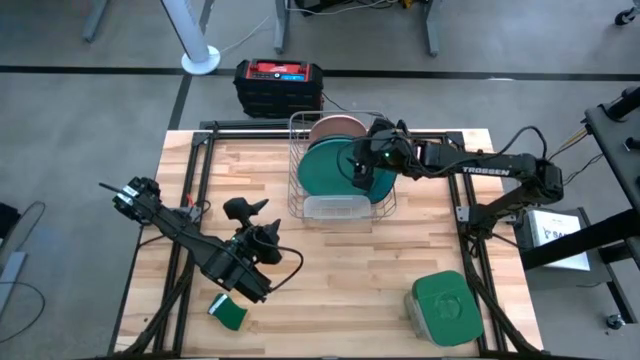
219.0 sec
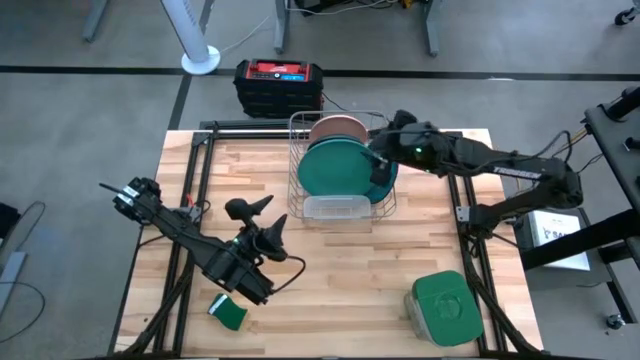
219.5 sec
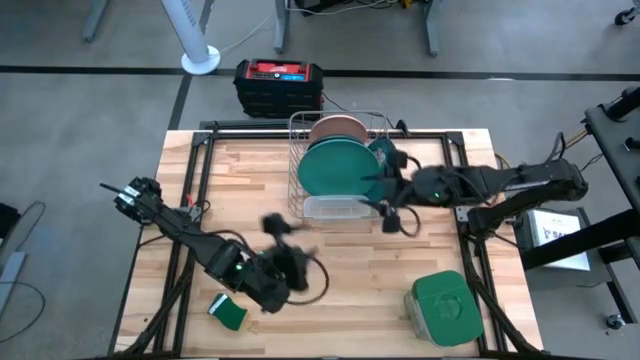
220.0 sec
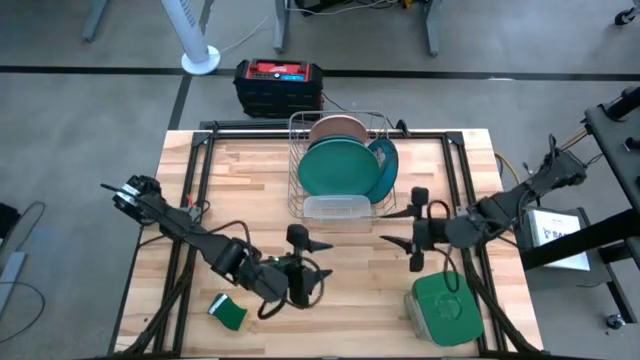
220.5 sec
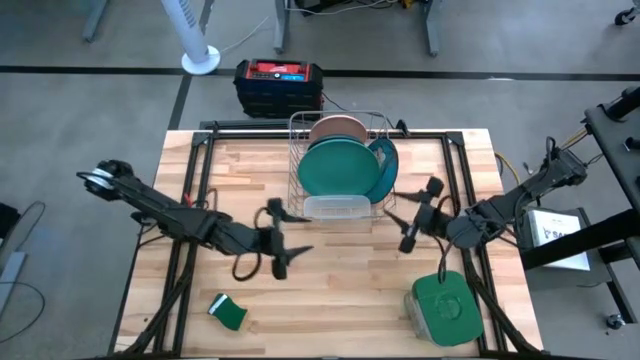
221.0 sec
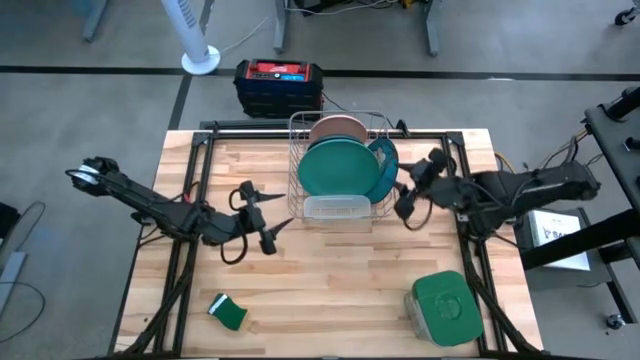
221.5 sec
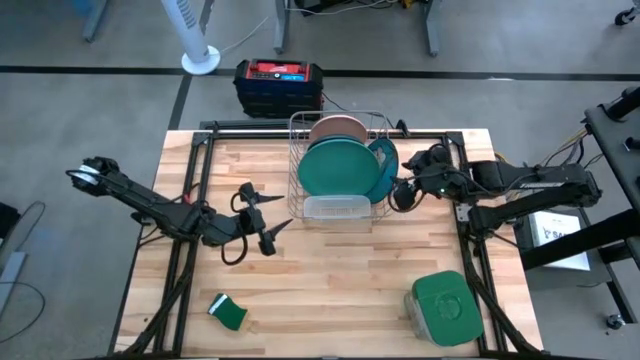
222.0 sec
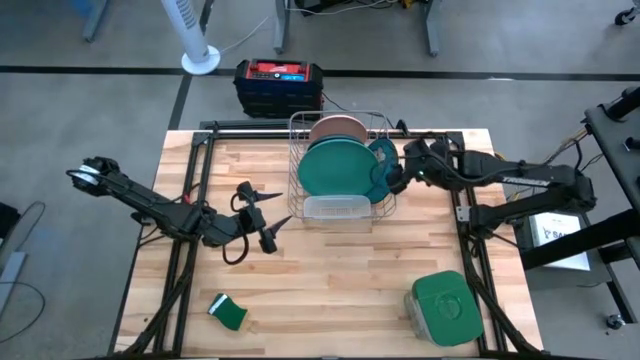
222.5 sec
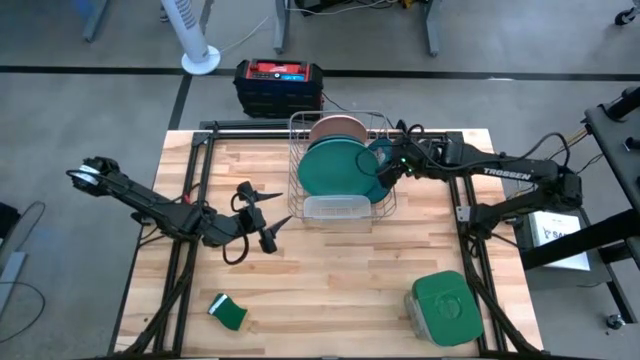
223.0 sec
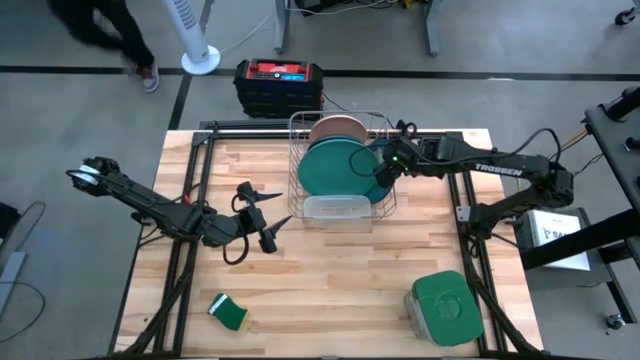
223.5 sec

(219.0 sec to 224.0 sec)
Task: Sort dishes
Adjust the blue plate

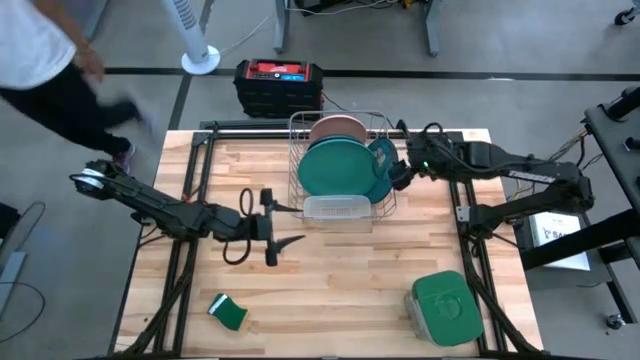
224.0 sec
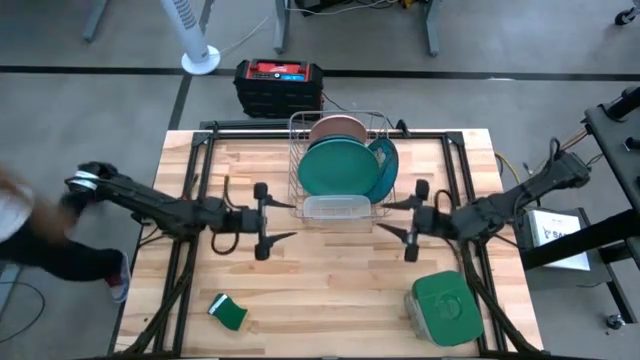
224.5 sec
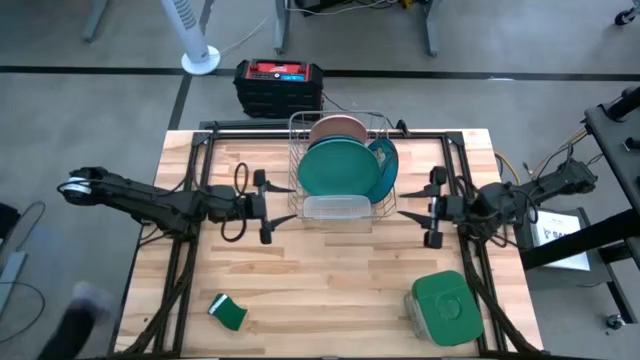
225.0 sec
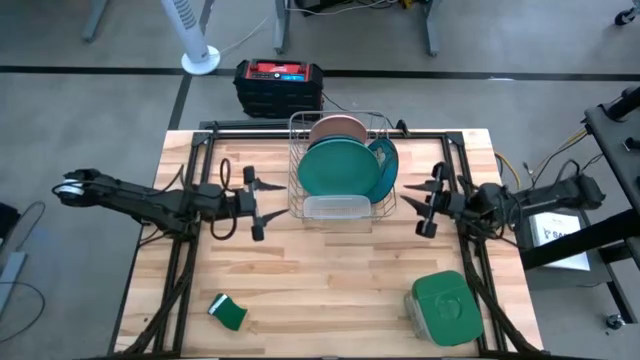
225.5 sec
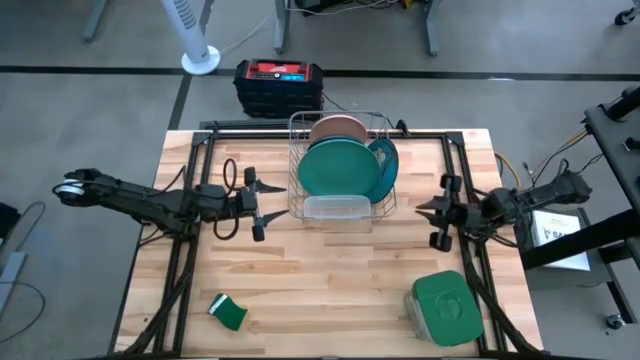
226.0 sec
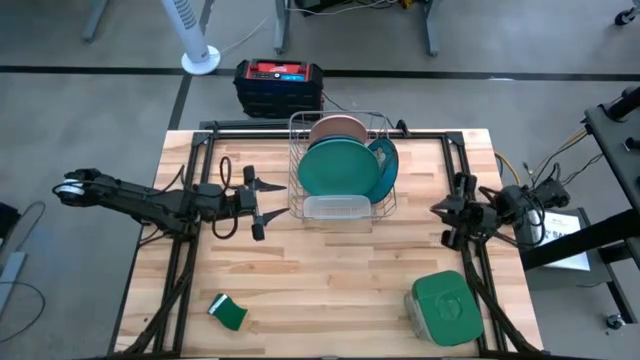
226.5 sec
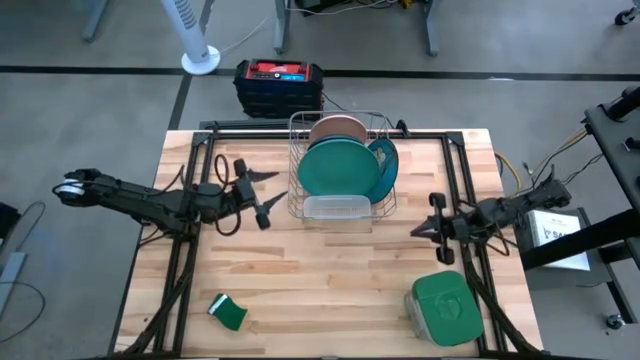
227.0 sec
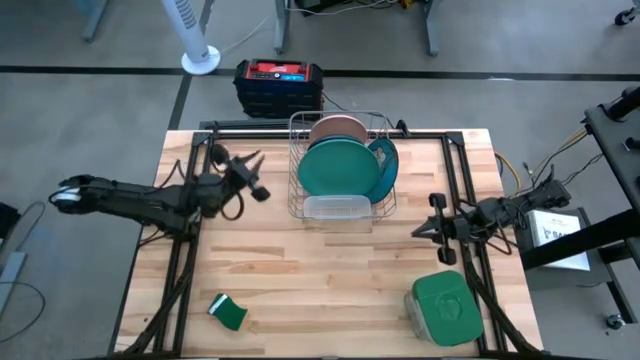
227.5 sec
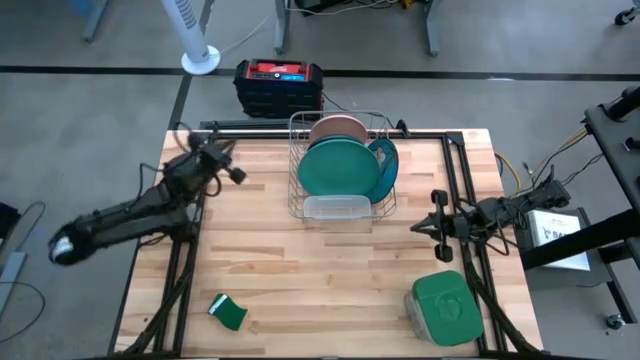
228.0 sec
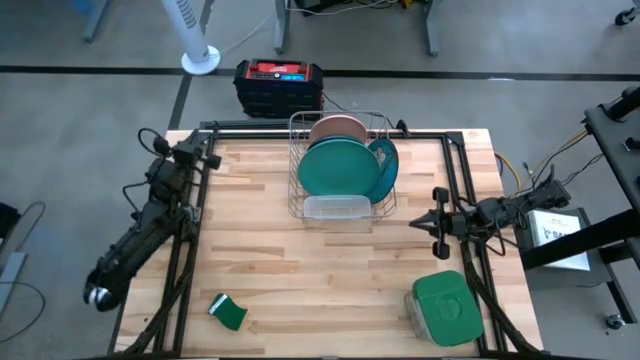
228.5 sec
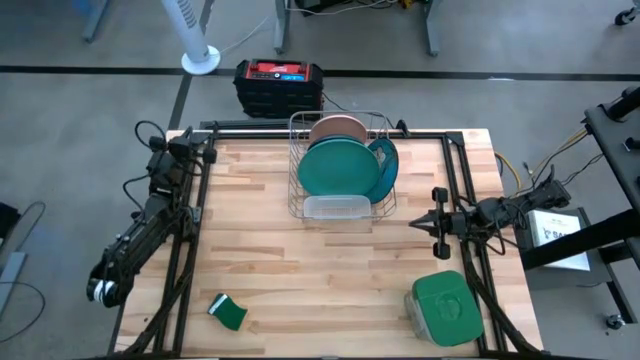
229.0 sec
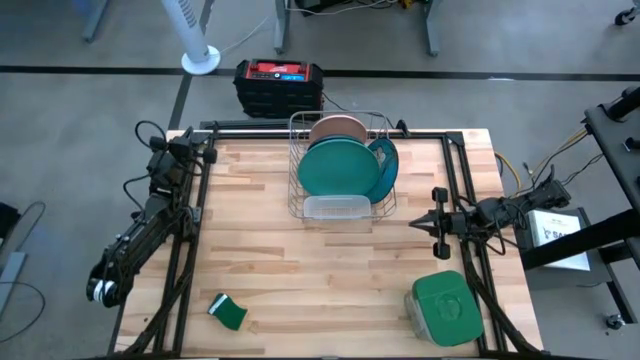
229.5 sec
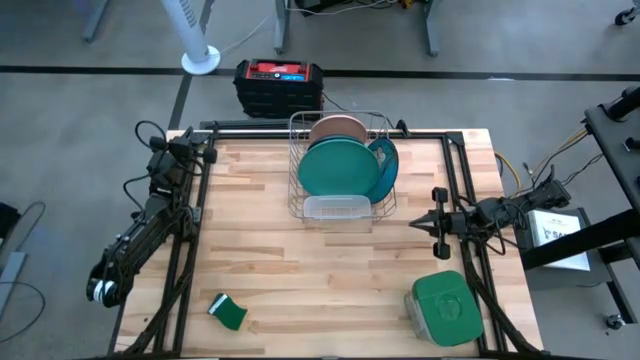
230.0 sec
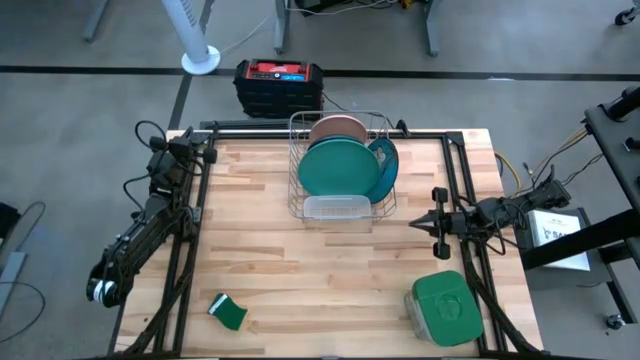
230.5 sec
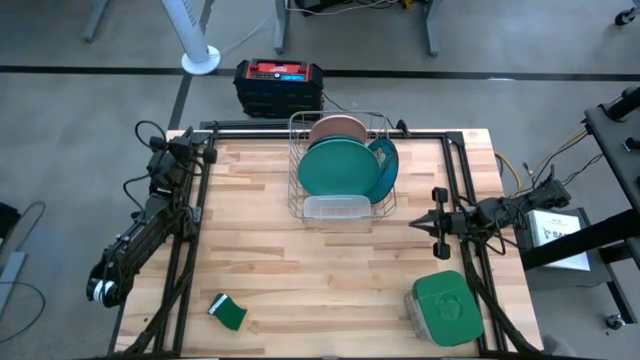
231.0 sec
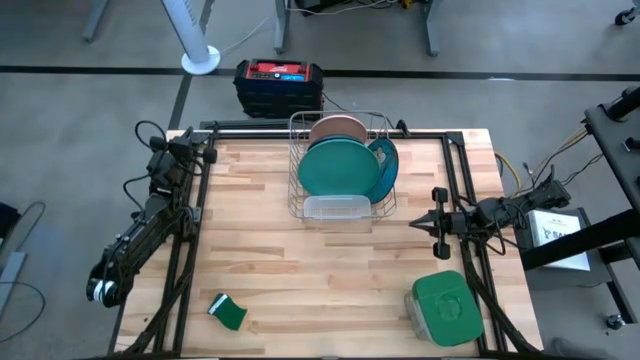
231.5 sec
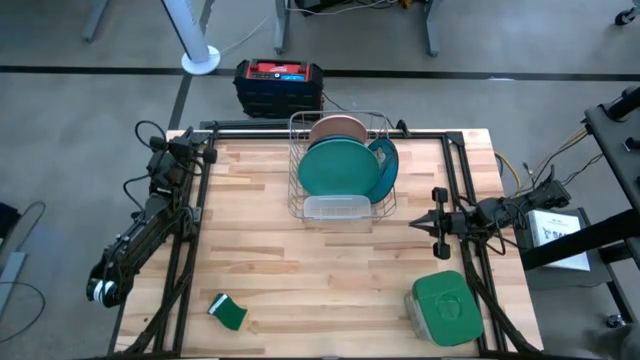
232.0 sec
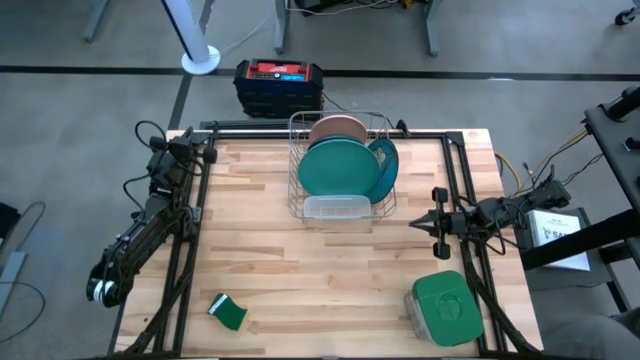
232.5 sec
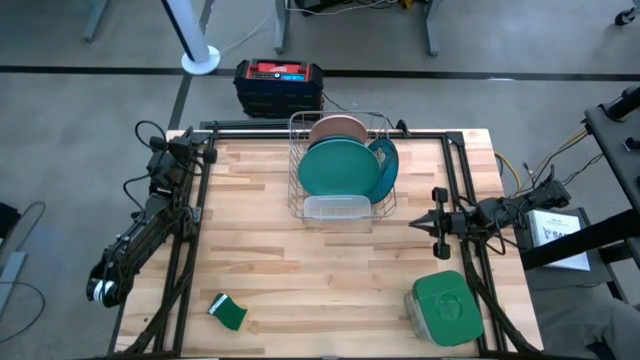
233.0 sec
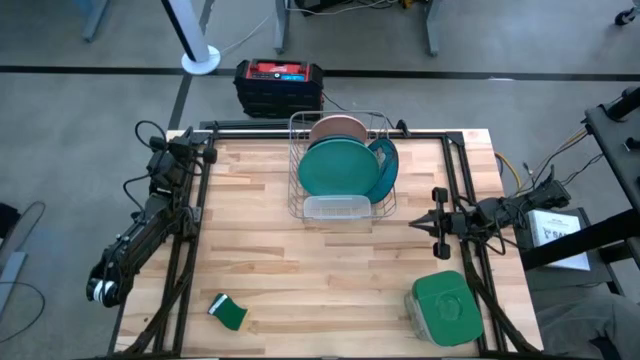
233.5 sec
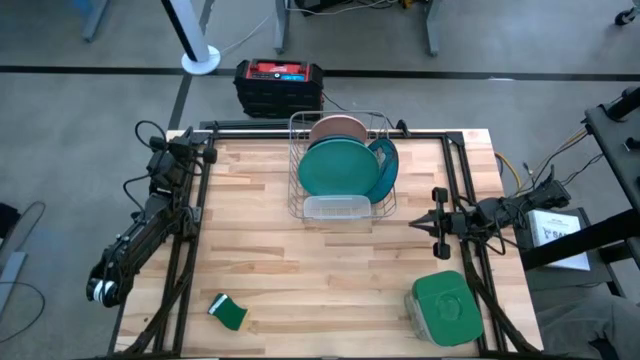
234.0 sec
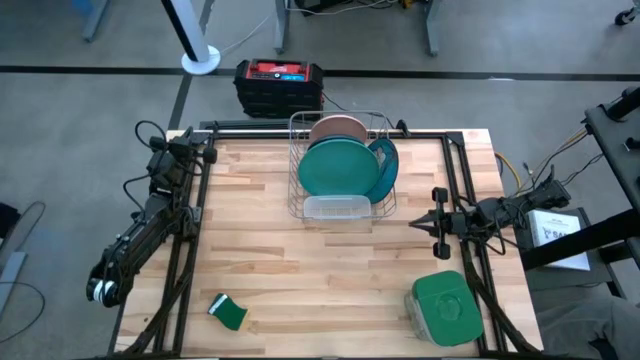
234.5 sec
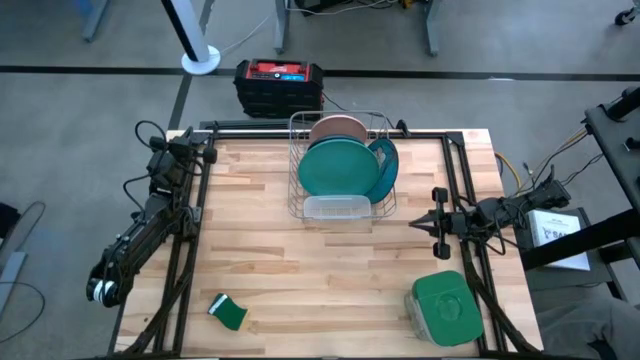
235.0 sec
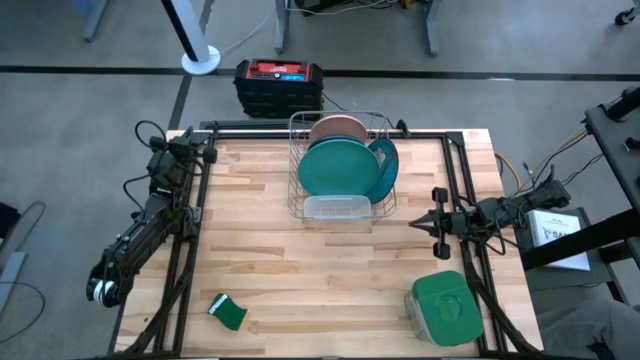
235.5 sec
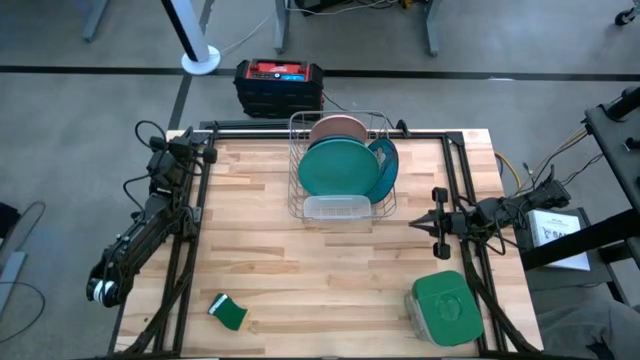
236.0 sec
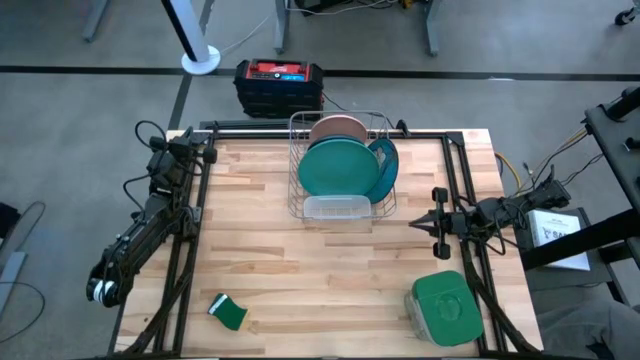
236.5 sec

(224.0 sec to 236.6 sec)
Return to Home Position

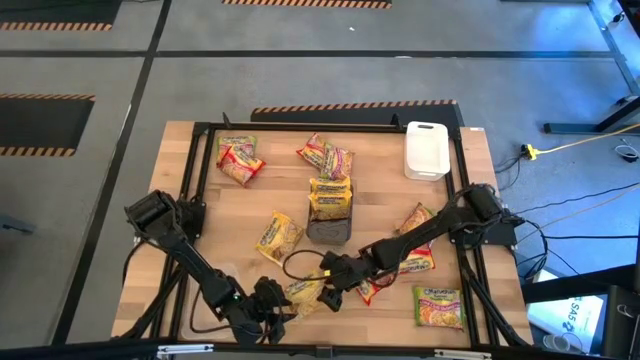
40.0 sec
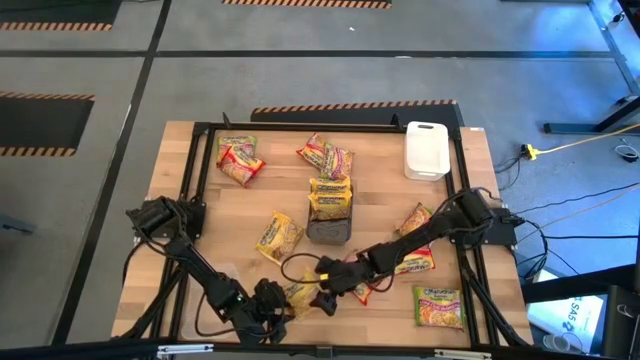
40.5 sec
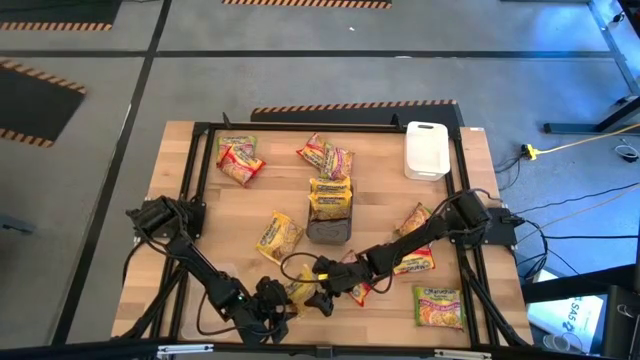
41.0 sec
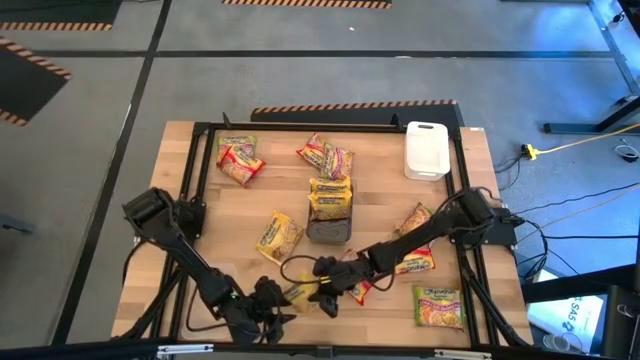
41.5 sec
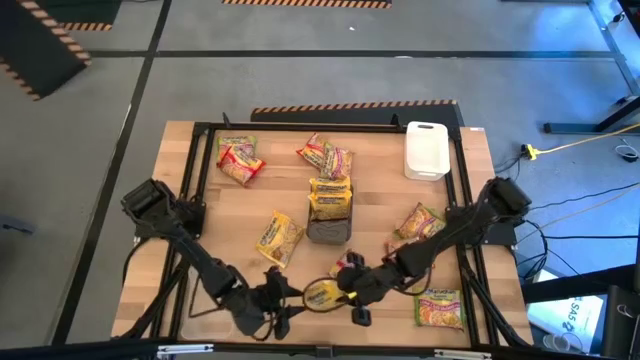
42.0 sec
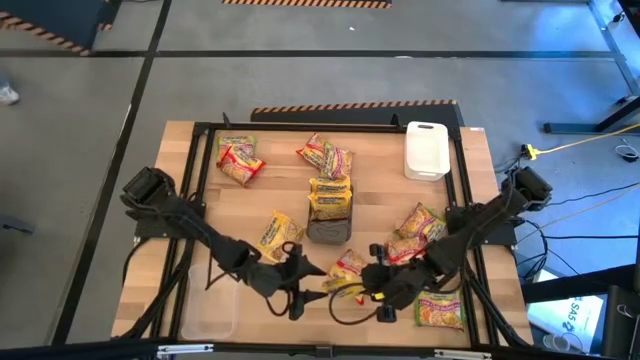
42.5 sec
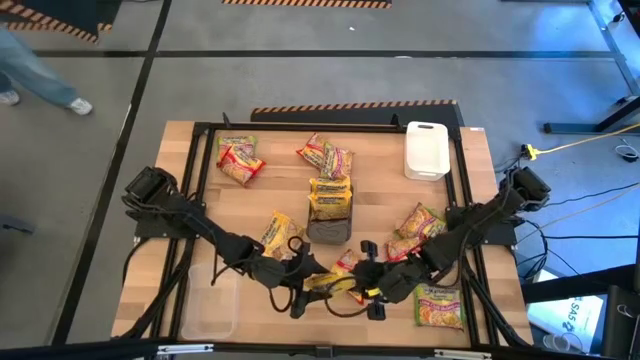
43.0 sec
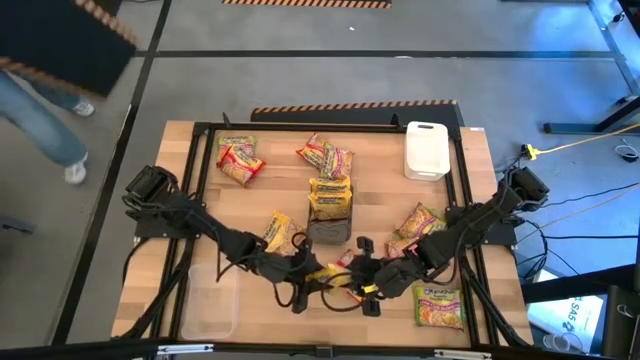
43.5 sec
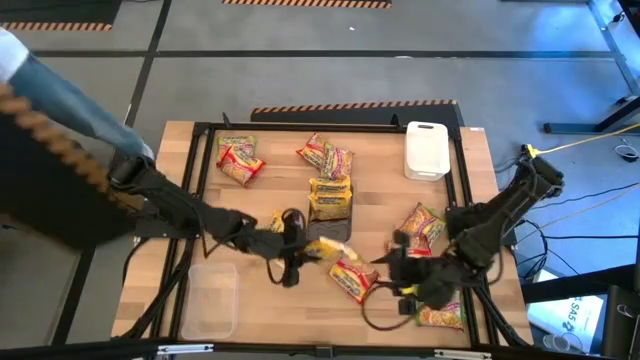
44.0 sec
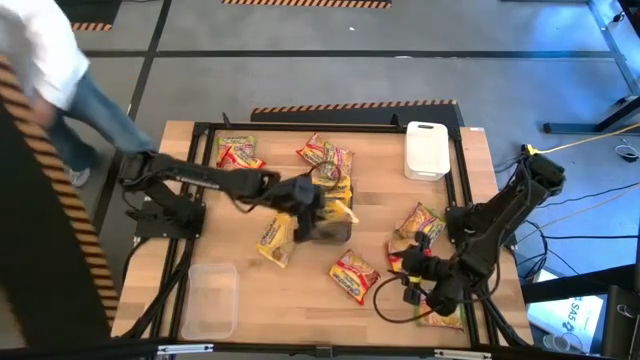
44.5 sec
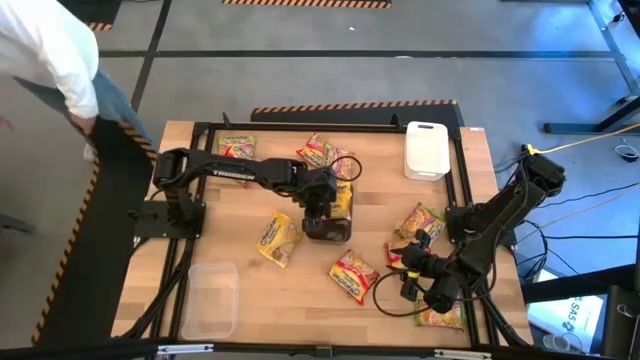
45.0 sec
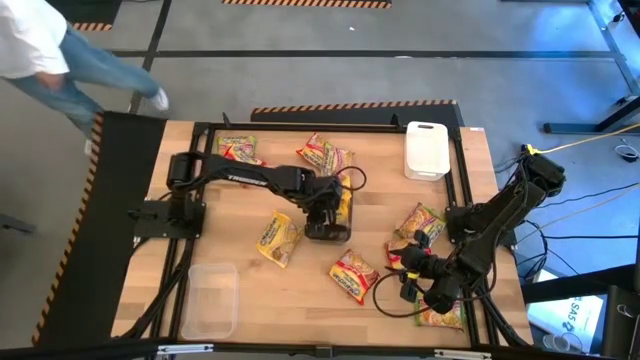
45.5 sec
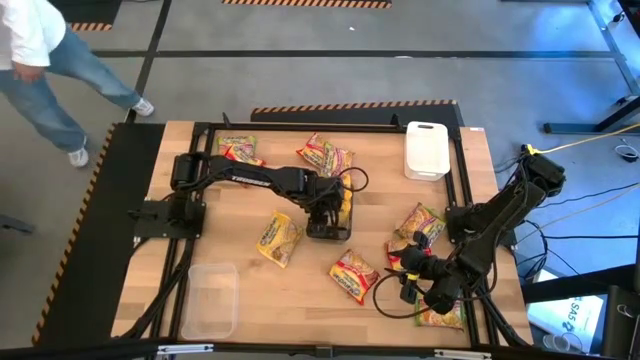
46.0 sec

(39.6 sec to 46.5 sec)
Task: Sort Maruchan noodles
Put the yellow noodle pack into the black bin
